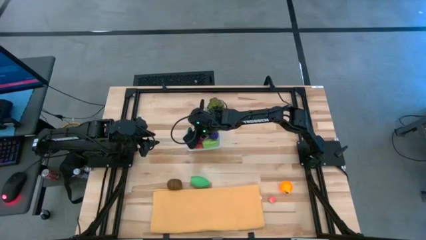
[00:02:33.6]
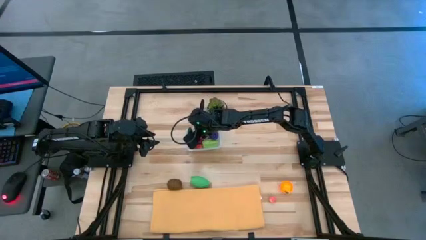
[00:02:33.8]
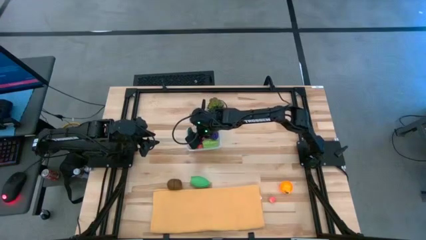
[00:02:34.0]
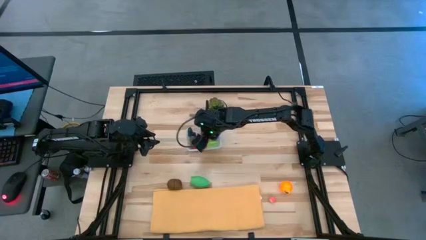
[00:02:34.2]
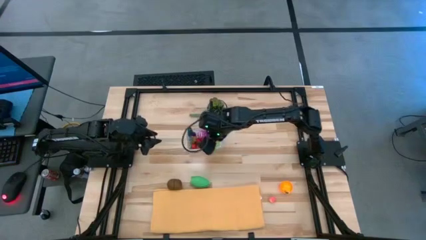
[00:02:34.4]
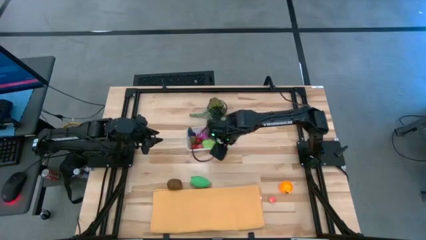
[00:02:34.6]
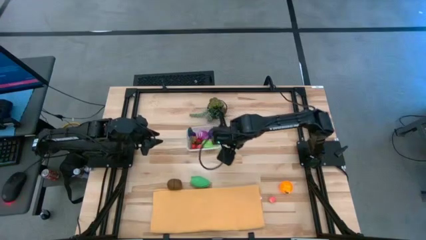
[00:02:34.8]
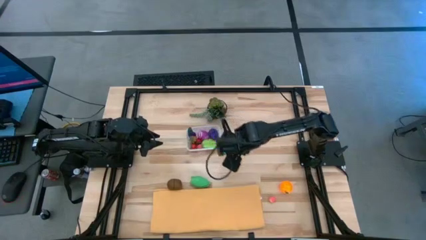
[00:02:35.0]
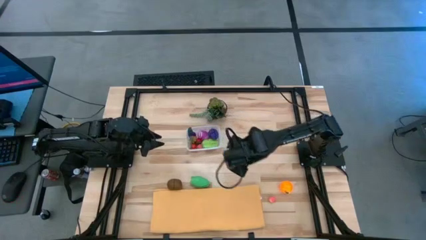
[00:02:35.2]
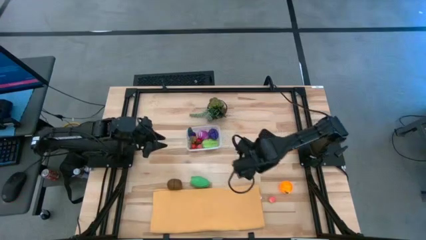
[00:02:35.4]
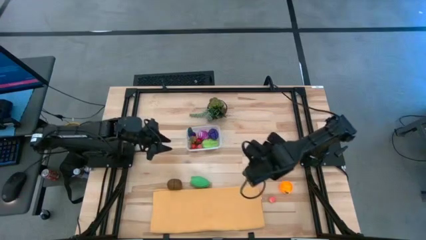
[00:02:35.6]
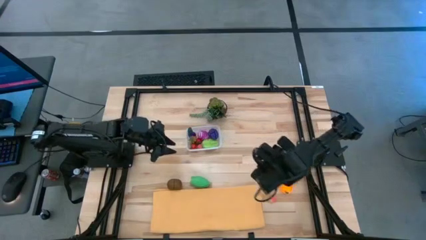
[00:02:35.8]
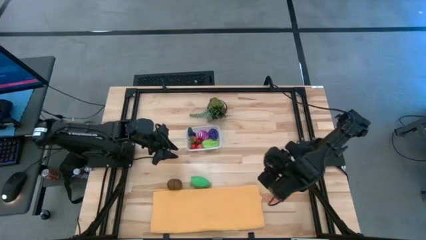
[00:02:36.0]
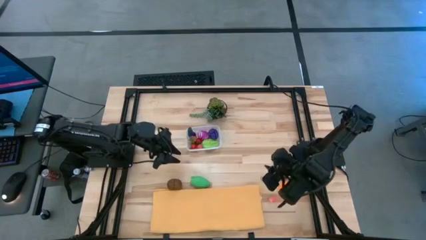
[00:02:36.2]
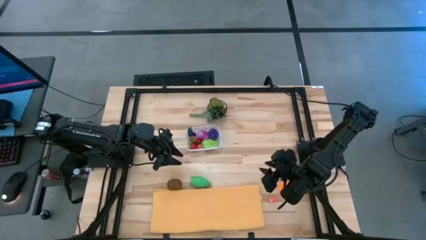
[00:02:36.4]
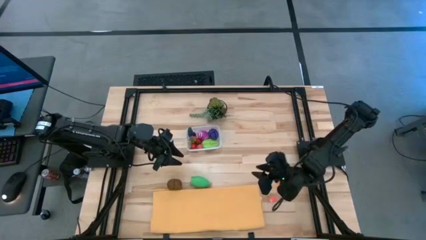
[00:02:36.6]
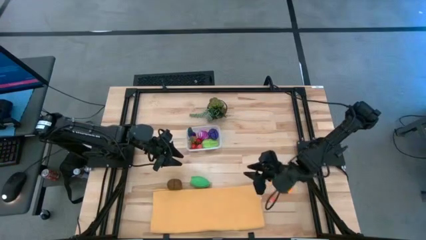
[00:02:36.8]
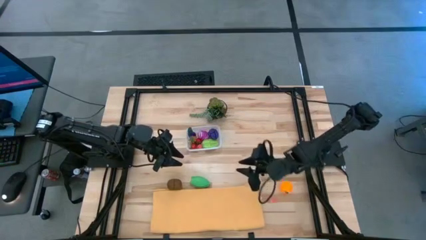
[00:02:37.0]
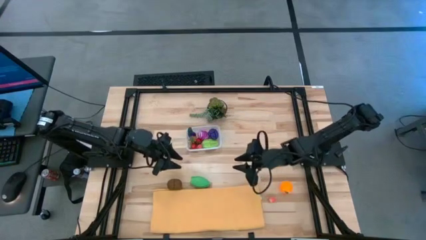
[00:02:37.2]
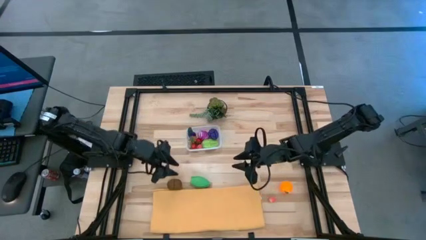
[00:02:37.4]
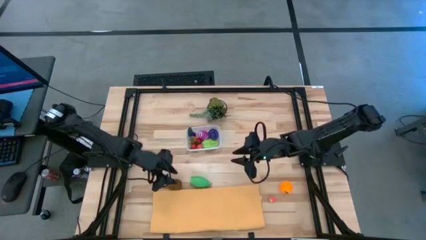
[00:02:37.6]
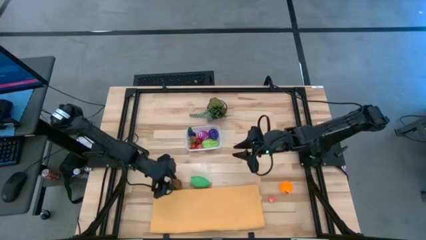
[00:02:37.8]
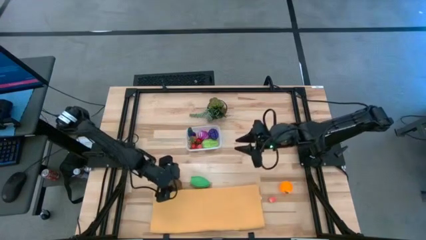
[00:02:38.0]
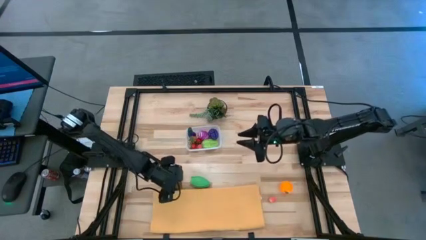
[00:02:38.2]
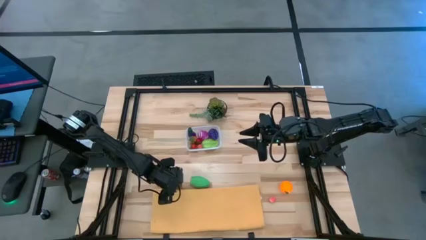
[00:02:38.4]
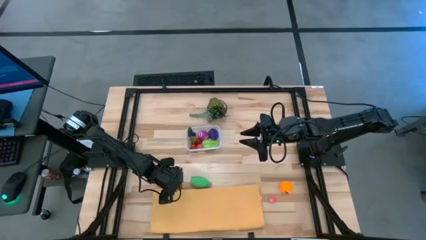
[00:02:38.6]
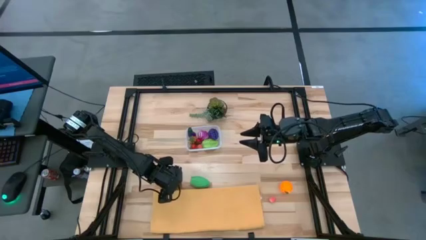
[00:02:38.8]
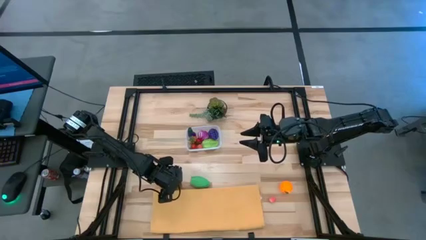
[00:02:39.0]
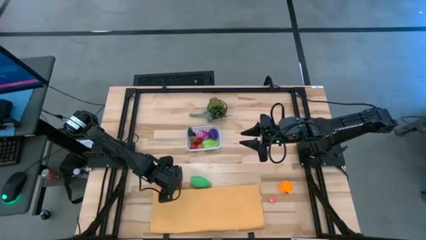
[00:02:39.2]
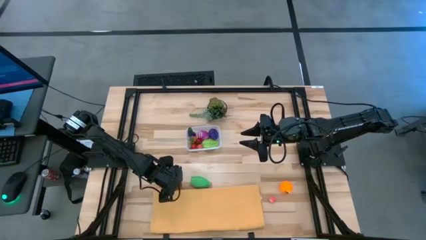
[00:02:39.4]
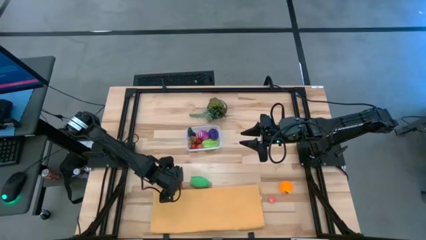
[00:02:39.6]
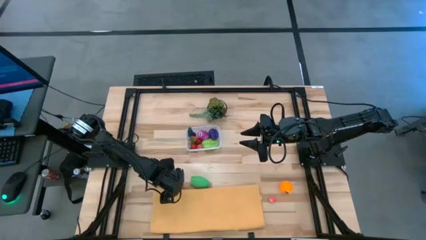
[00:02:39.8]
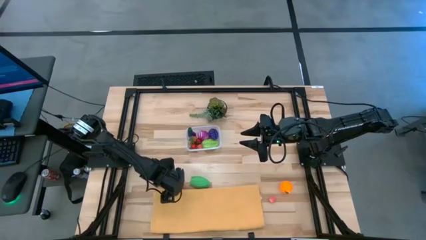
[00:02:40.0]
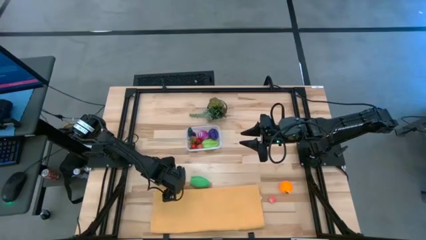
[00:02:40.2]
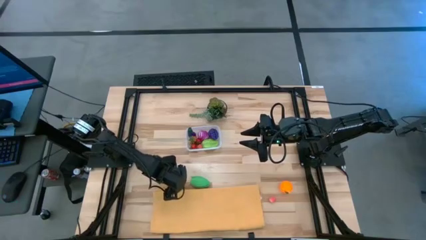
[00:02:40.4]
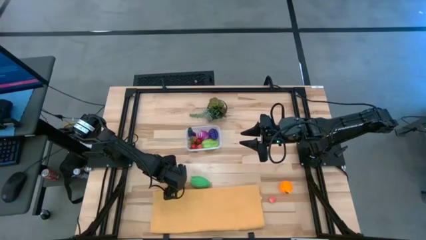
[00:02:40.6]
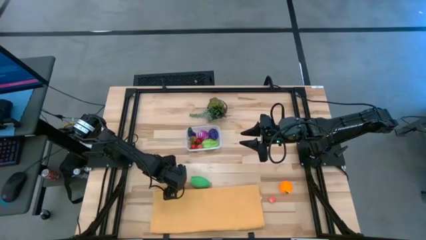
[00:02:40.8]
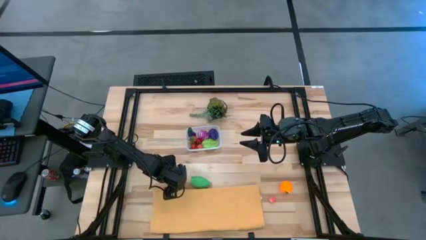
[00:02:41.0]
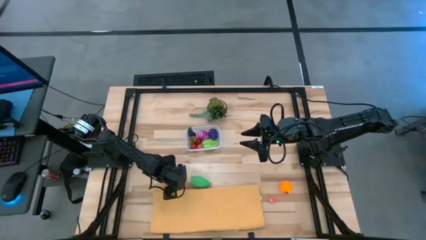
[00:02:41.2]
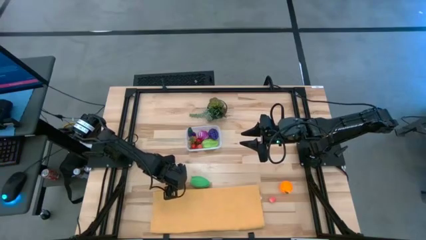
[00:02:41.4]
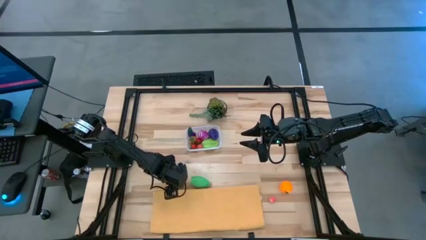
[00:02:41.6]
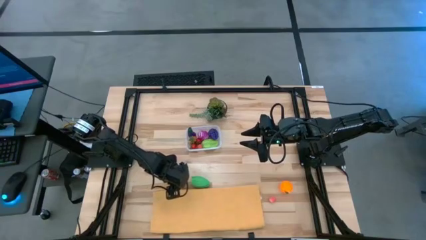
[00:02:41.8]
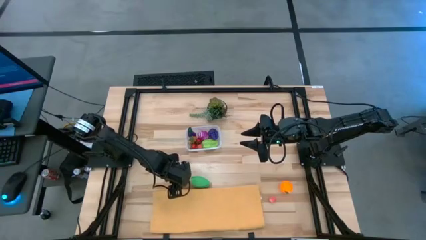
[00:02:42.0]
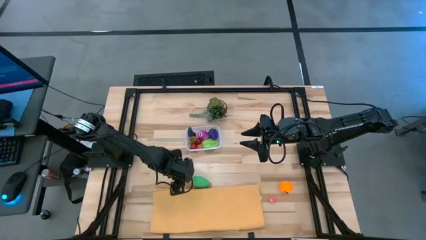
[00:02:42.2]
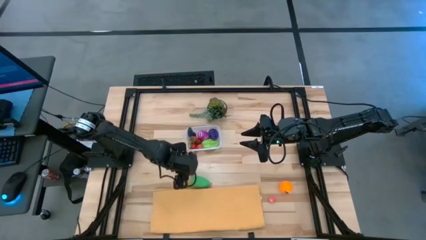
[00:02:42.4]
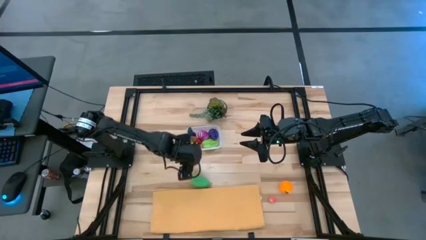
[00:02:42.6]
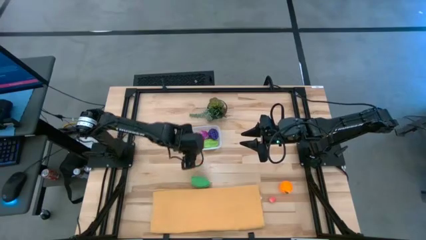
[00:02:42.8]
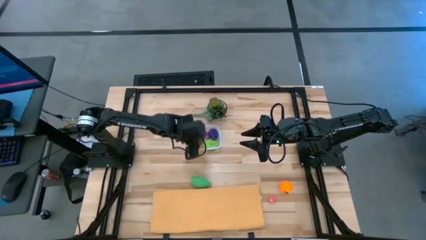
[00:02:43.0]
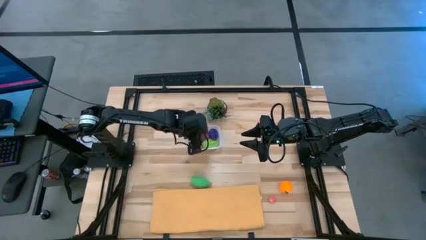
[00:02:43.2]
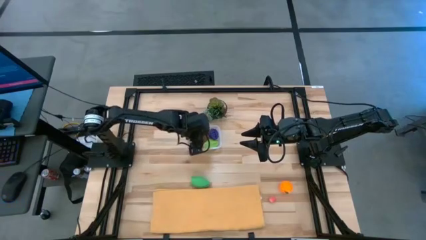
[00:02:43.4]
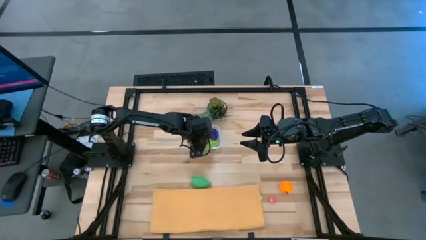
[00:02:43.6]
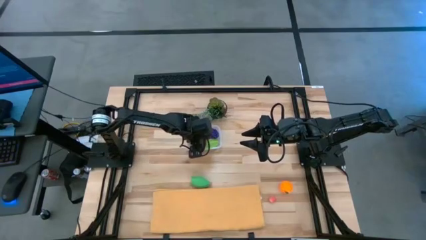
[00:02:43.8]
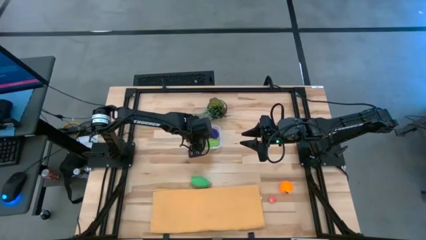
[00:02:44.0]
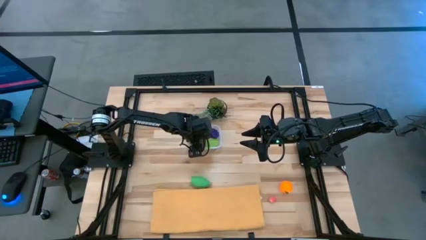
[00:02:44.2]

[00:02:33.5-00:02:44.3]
Task: Pick and placing Produce into tupperware
Put the brown kiwi into the transparent bin

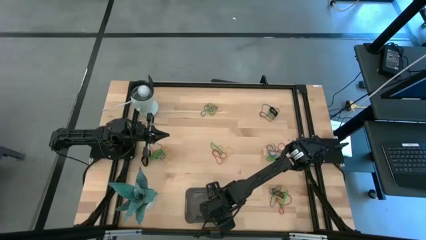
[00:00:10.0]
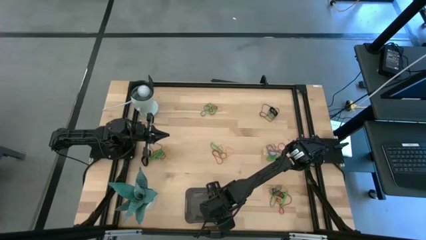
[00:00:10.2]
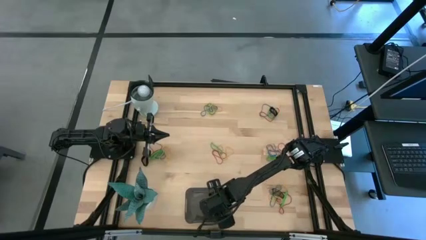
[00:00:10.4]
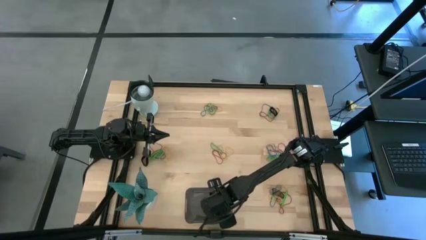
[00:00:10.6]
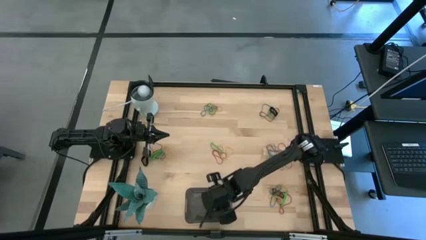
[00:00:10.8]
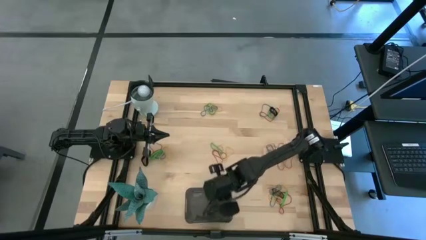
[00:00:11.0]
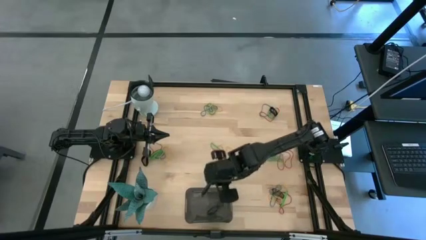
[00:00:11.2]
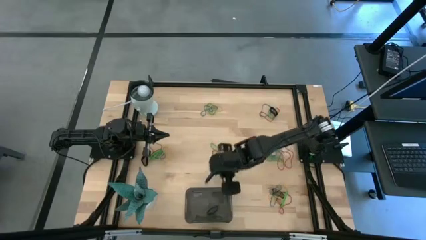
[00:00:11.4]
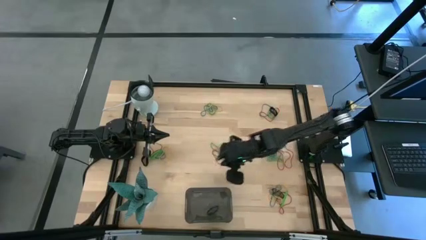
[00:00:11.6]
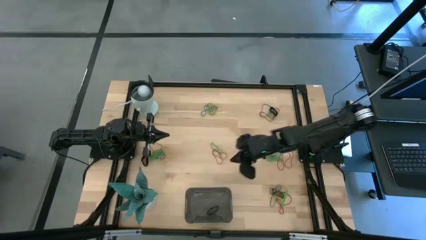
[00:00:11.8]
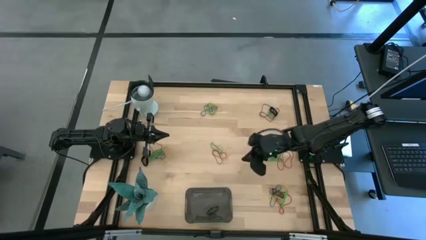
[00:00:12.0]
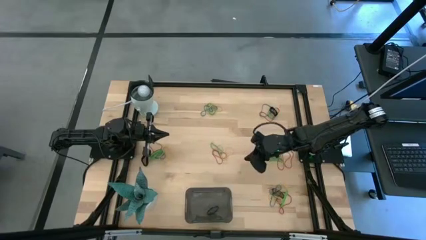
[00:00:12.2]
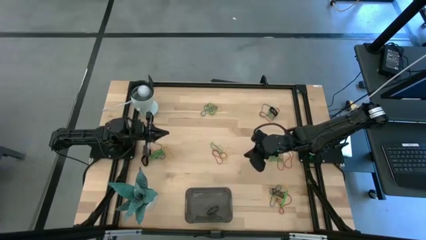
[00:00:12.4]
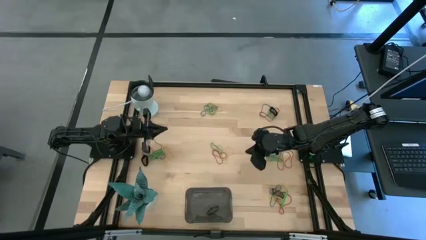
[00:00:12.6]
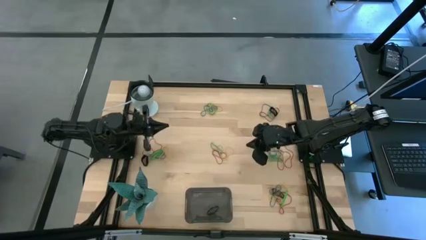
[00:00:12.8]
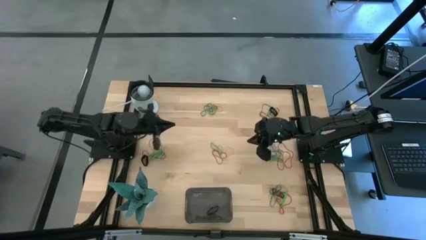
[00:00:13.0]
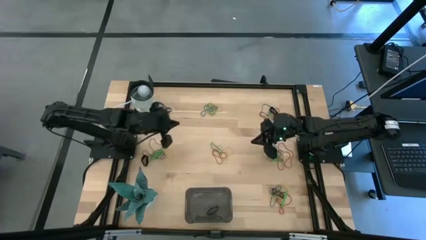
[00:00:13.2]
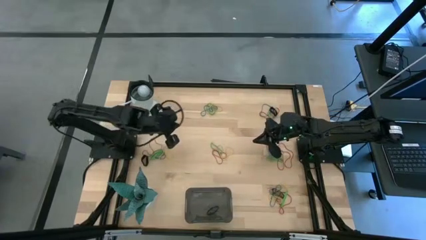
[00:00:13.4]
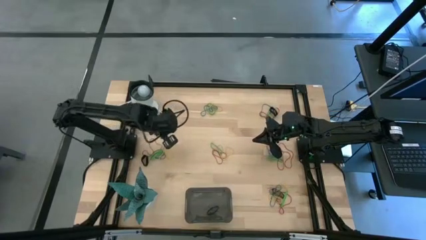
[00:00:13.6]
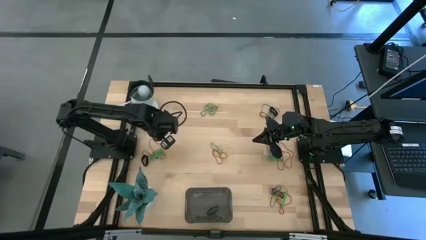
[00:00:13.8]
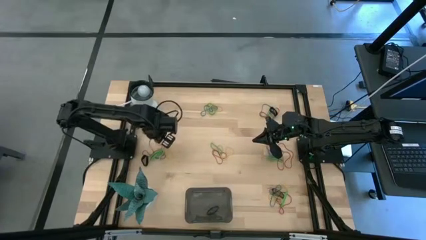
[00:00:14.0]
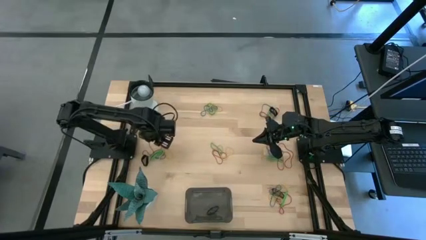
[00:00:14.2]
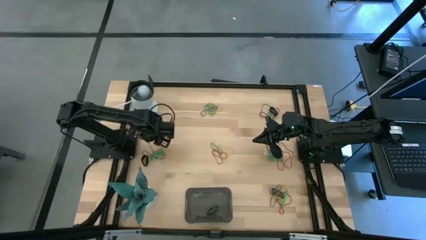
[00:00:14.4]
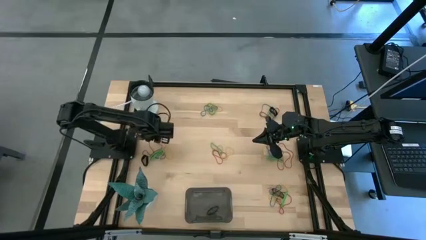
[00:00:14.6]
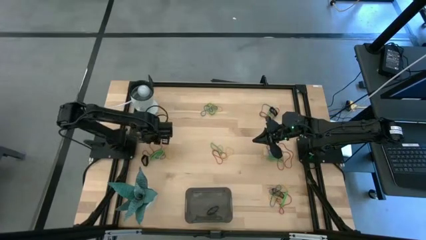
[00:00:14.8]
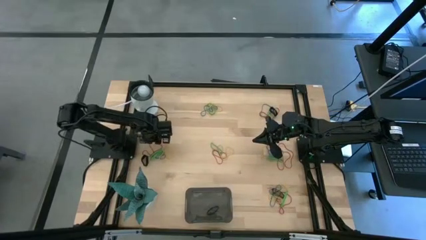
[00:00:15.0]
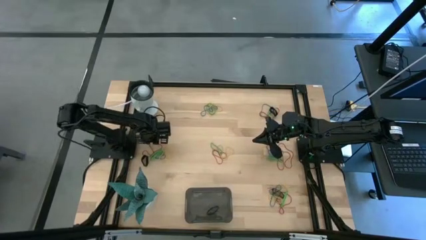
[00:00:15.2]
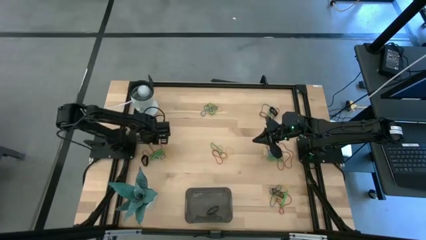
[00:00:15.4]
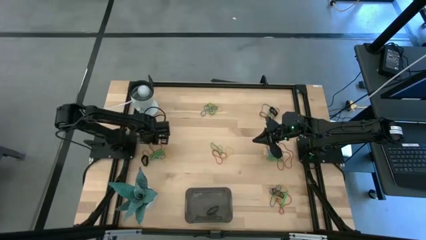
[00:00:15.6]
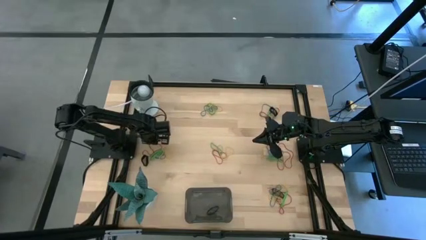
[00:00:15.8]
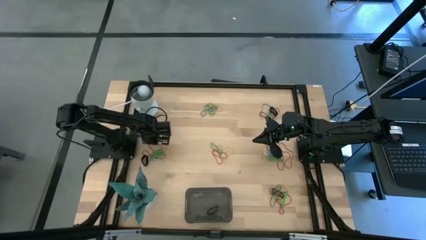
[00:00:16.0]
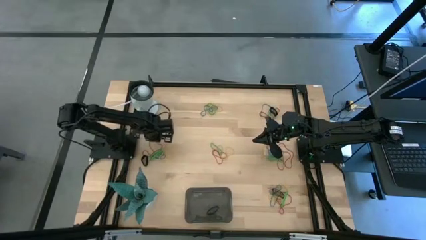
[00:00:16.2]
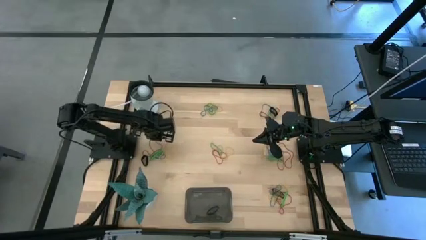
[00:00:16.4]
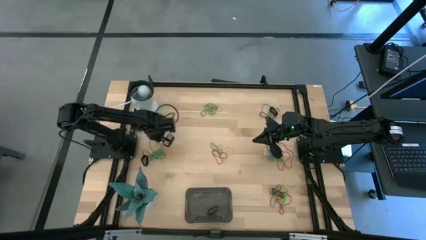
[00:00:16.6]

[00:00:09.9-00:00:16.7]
Task: Pick and place rubber bands into bin
Put the red rubber band into the black bin
